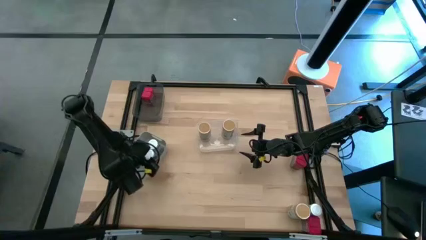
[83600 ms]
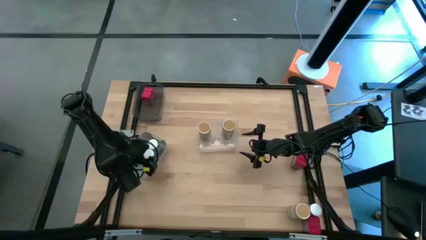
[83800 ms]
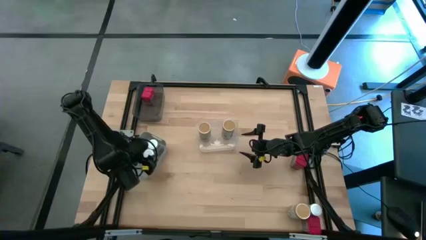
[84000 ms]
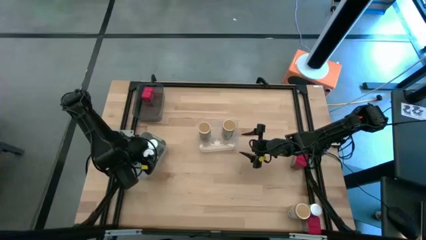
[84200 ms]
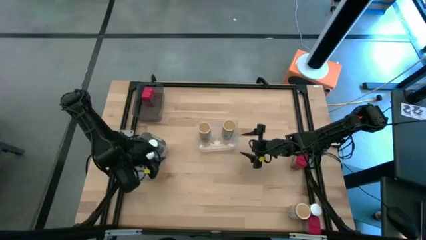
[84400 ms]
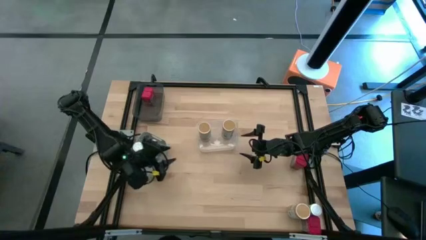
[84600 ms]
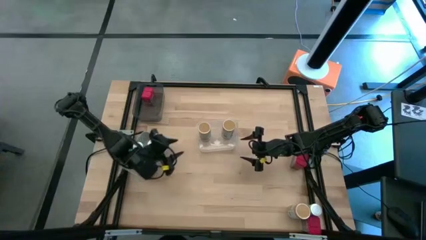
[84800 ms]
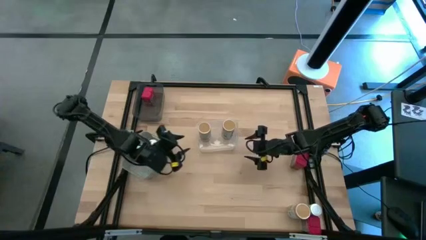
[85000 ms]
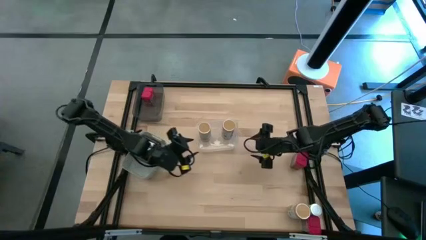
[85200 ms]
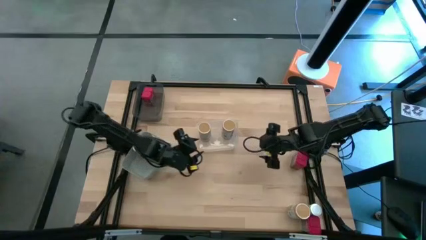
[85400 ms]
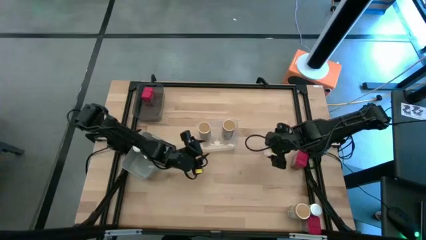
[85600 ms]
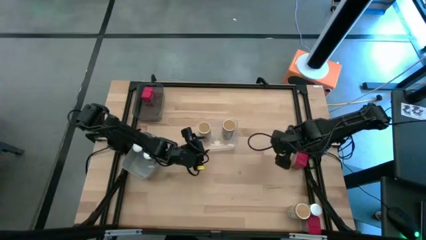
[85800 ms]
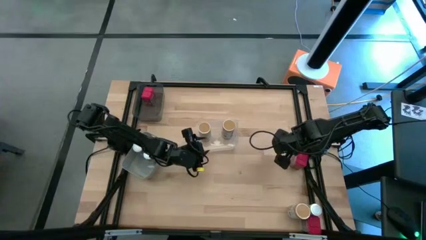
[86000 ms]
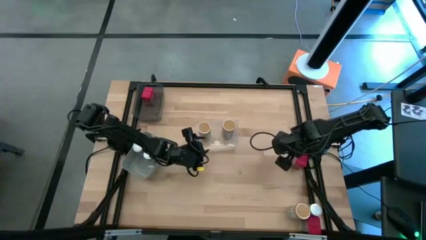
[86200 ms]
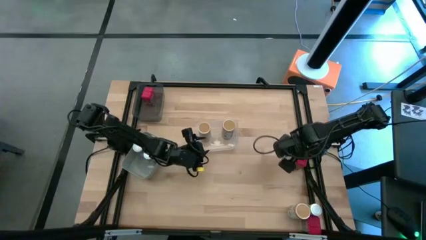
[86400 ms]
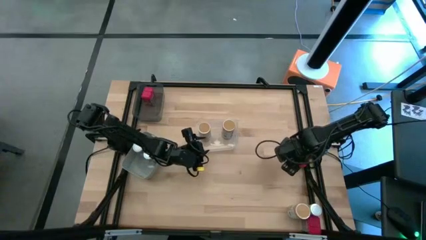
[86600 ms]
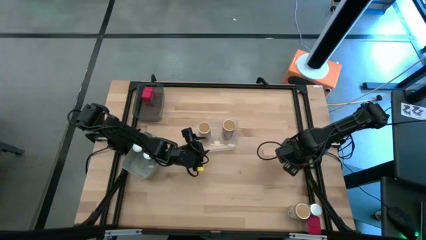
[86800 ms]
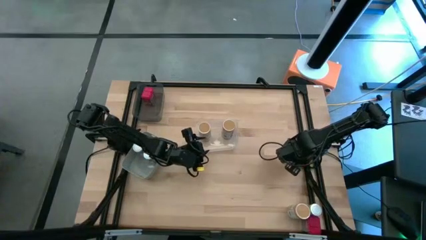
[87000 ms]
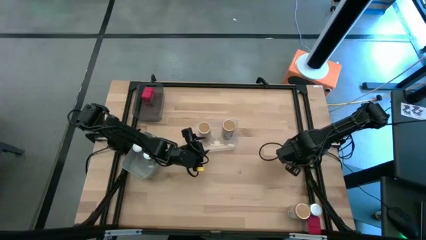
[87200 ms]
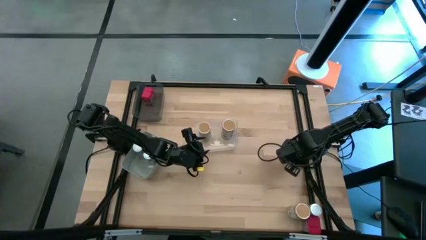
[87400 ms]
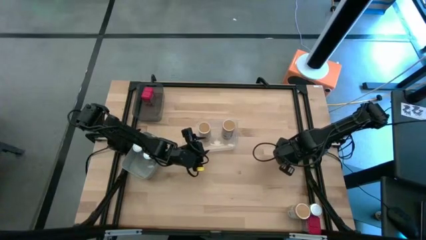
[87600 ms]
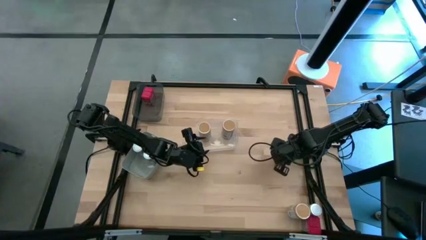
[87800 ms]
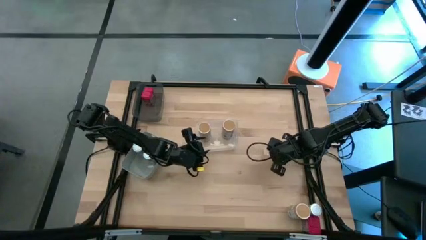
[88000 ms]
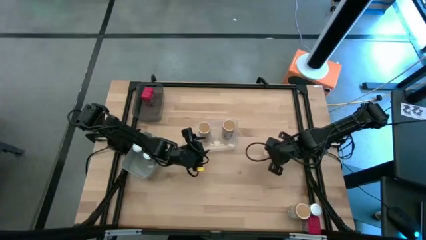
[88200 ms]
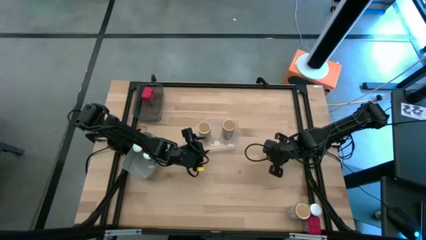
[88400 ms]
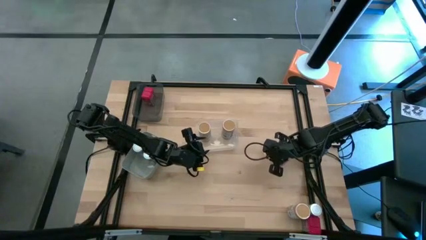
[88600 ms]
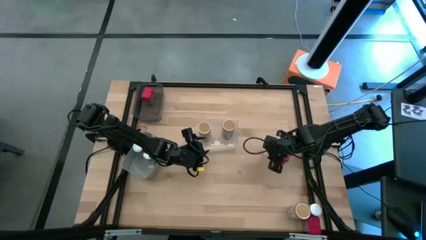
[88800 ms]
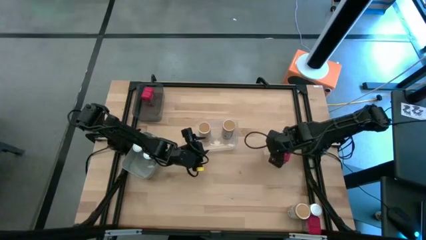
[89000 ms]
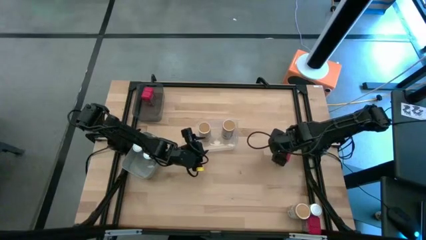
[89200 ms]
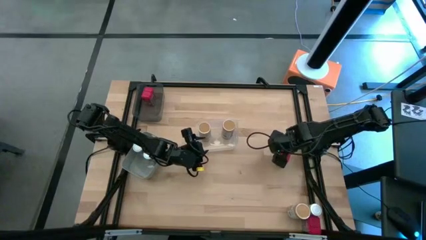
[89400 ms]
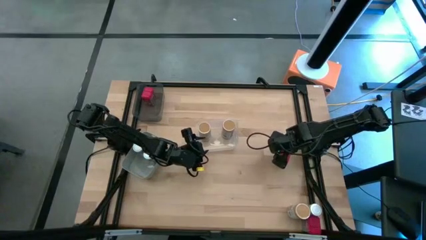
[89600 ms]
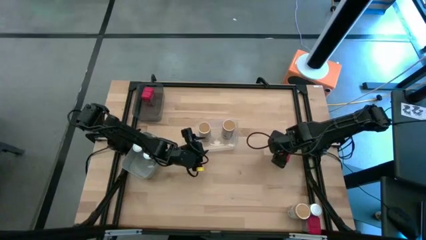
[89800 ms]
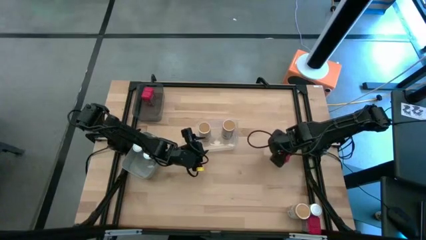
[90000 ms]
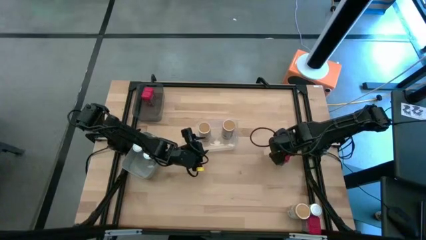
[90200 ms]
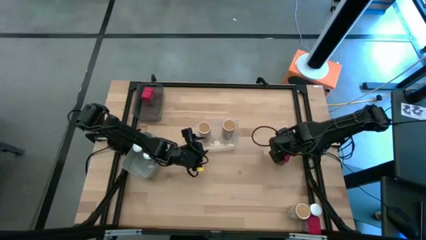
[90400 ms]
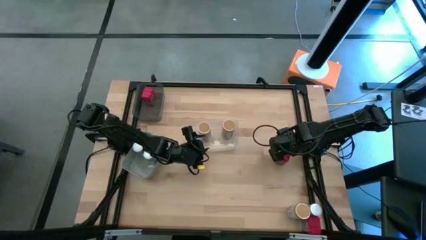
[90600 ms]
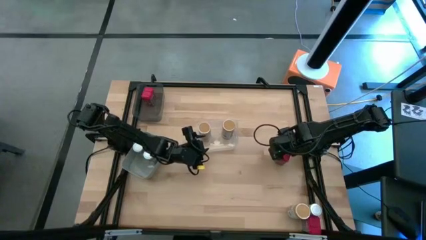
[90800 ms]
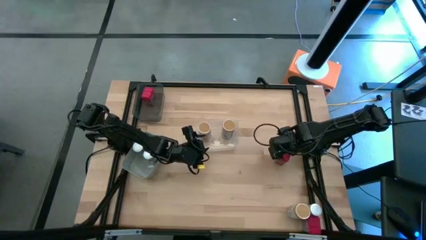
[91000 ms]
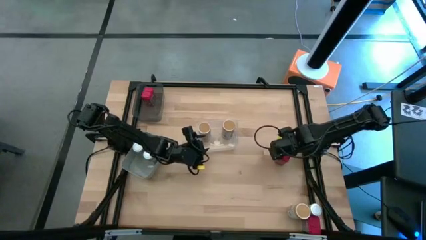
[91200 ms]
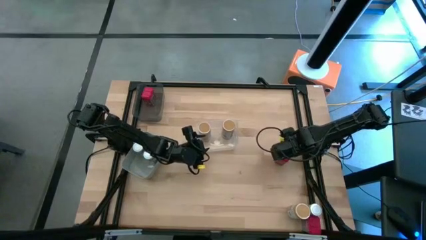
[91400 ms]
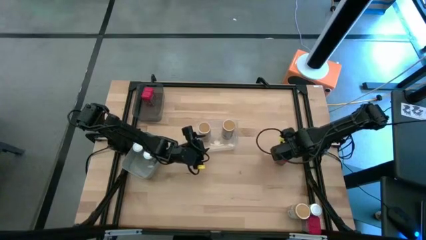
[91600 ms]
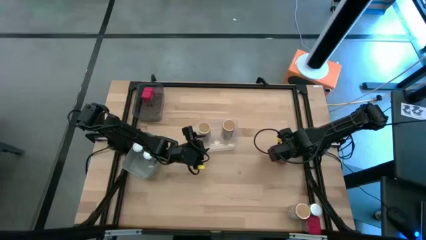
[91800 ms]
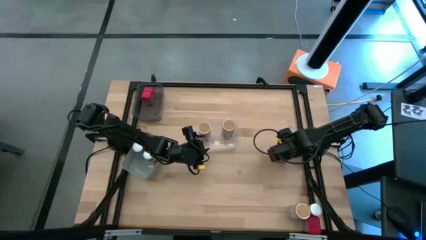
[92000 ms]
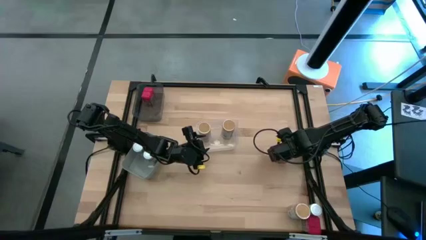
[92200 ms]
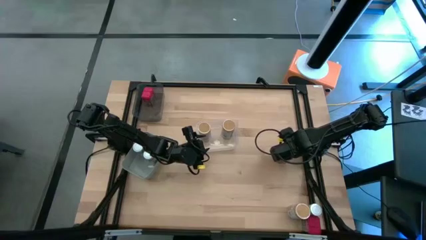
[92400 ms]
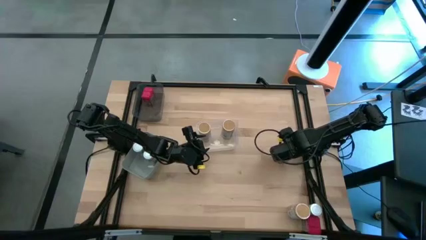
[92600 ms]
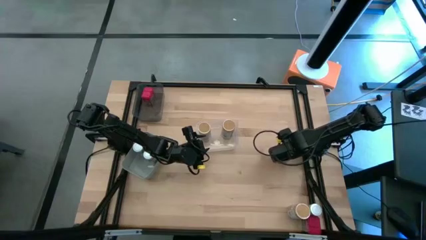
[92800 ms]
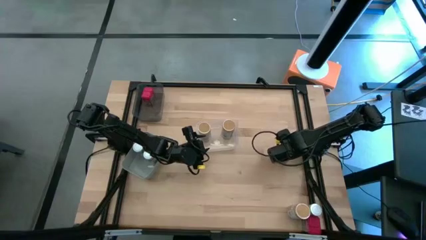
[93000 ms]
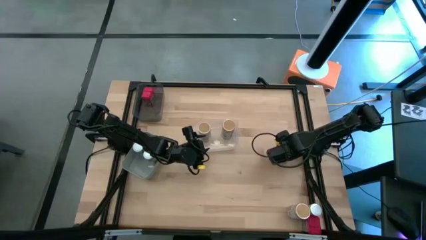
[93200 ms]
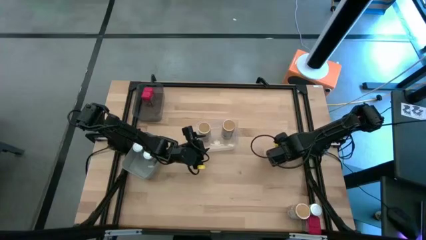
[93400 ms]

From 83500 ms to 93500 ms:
Task: Sort spices by type
Put the top red seasoning can into the black bin

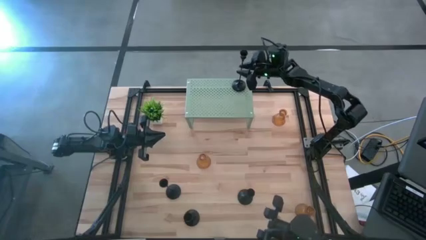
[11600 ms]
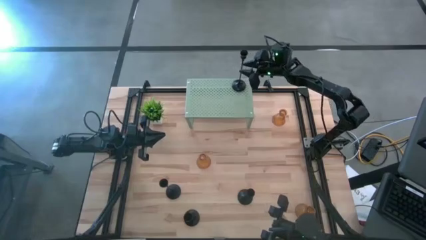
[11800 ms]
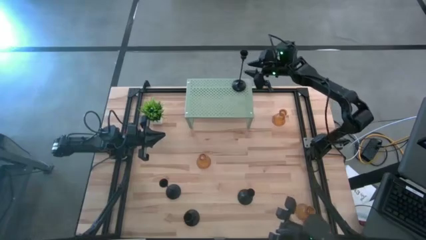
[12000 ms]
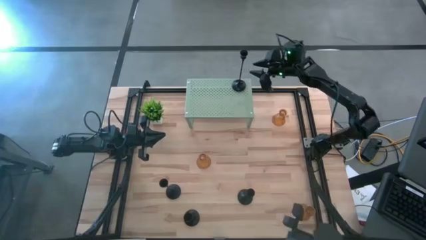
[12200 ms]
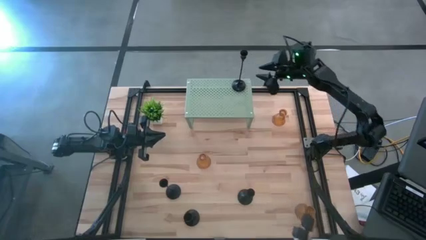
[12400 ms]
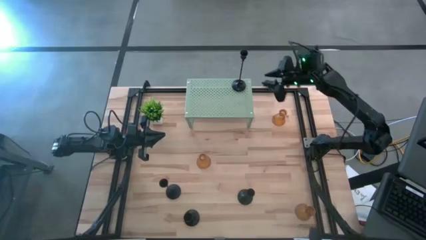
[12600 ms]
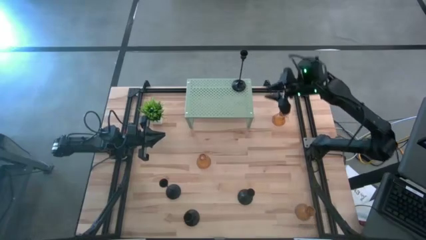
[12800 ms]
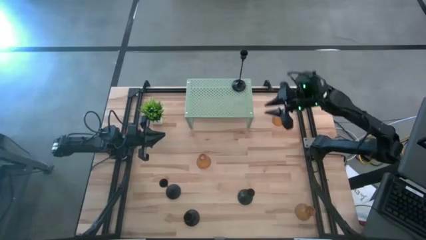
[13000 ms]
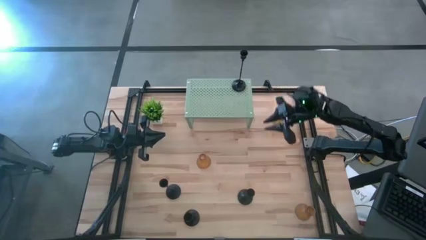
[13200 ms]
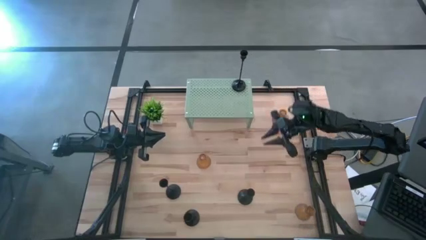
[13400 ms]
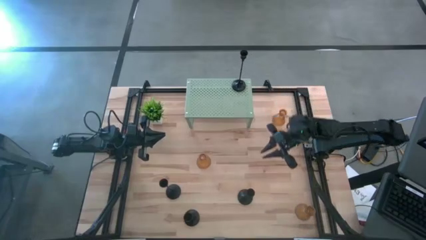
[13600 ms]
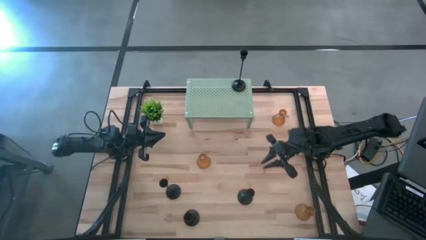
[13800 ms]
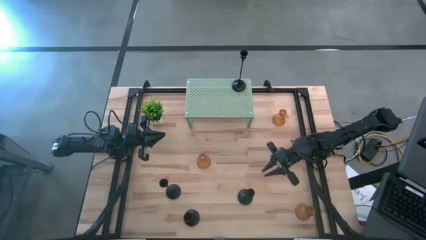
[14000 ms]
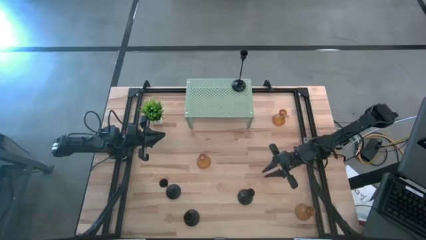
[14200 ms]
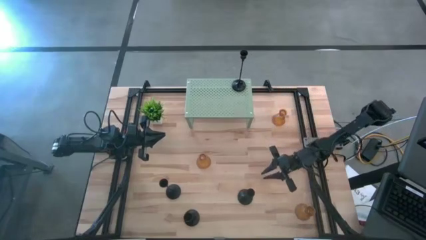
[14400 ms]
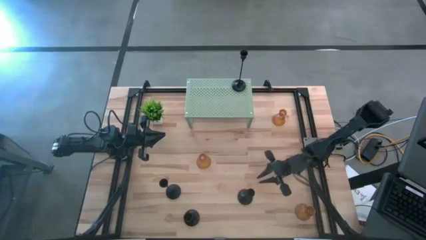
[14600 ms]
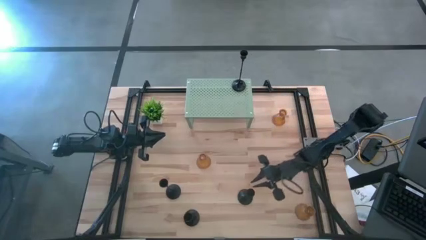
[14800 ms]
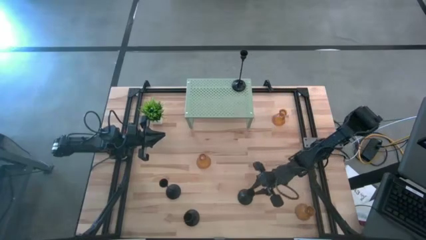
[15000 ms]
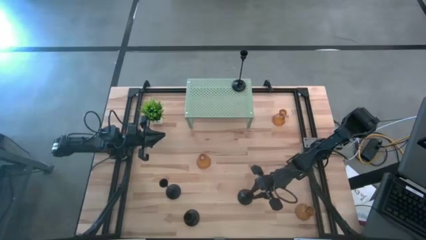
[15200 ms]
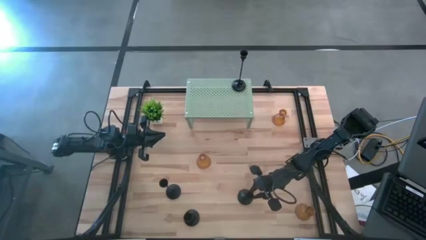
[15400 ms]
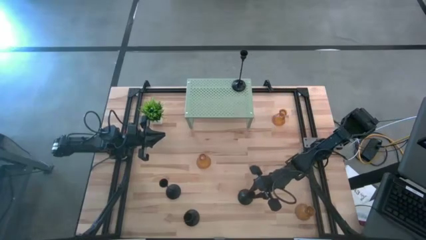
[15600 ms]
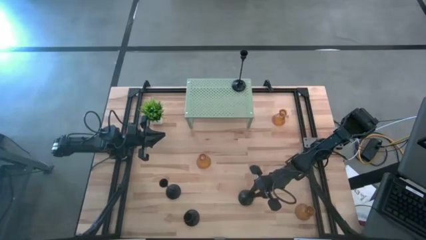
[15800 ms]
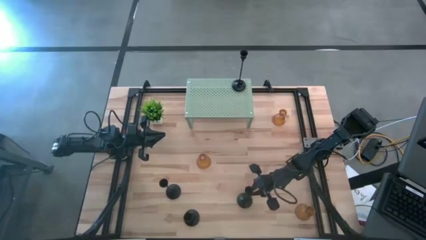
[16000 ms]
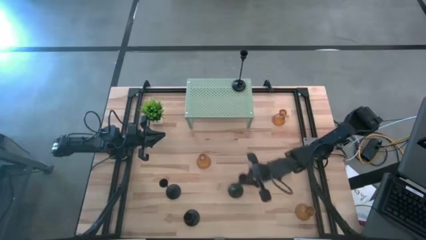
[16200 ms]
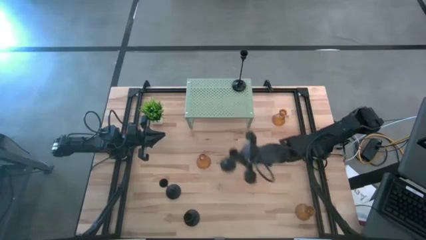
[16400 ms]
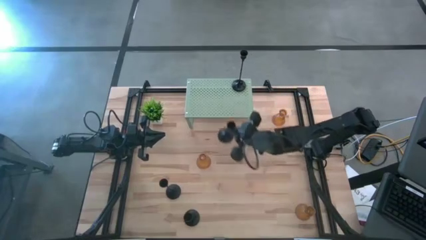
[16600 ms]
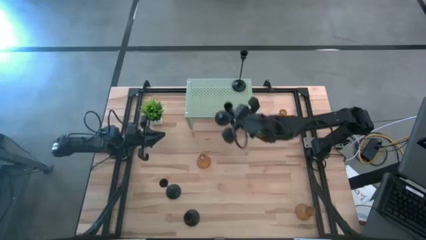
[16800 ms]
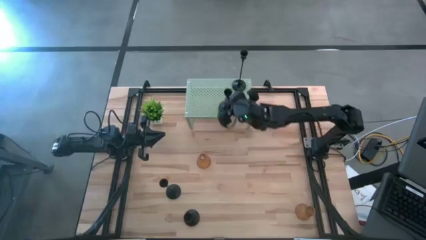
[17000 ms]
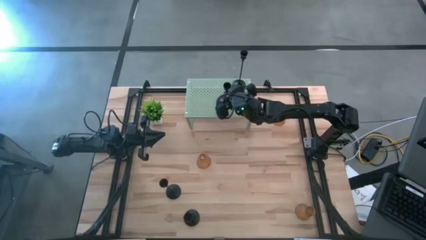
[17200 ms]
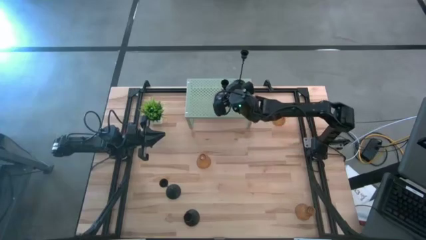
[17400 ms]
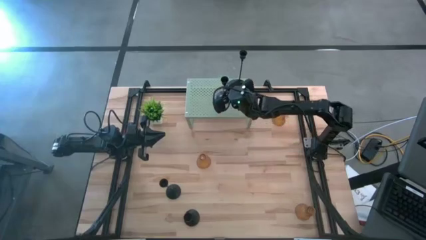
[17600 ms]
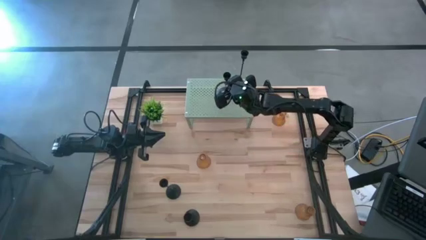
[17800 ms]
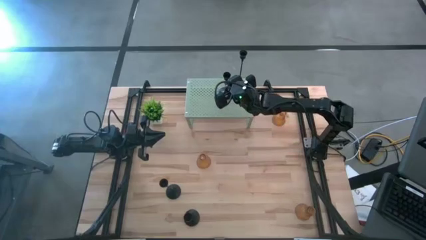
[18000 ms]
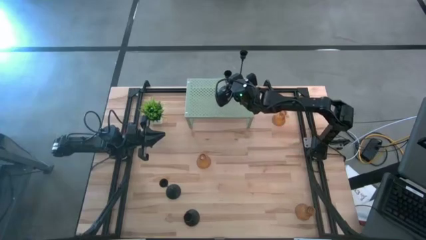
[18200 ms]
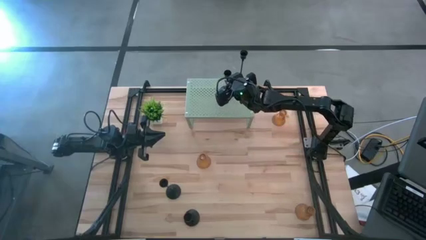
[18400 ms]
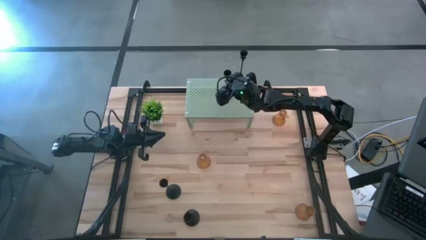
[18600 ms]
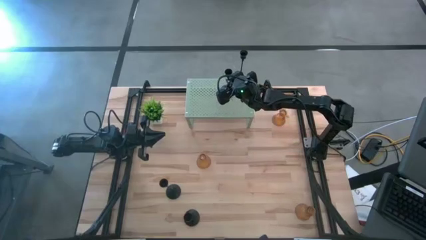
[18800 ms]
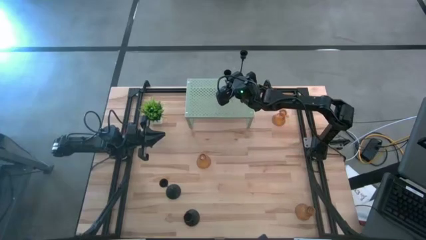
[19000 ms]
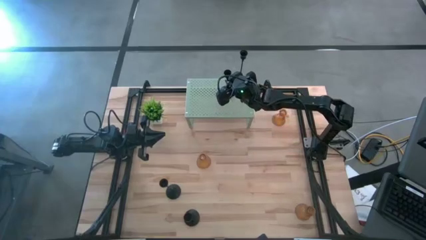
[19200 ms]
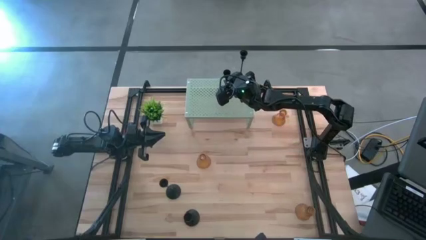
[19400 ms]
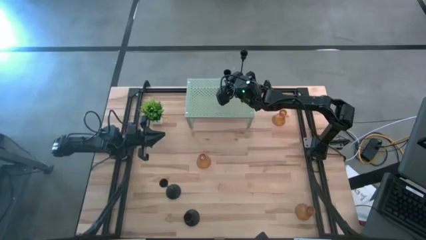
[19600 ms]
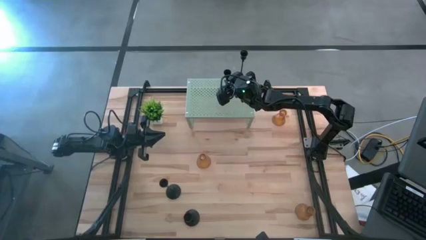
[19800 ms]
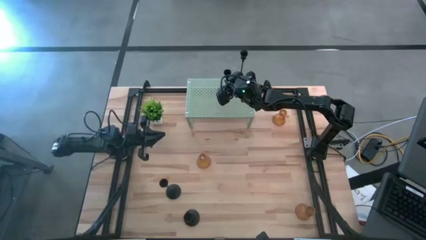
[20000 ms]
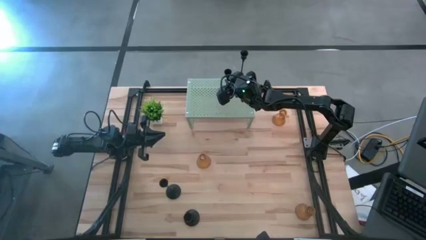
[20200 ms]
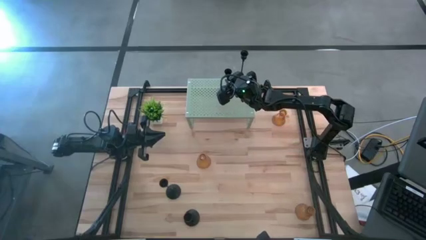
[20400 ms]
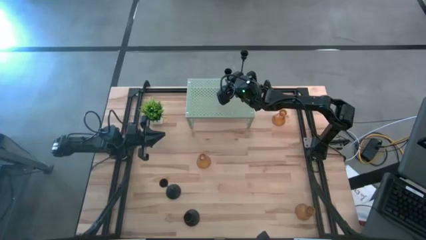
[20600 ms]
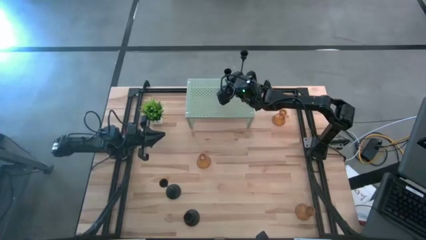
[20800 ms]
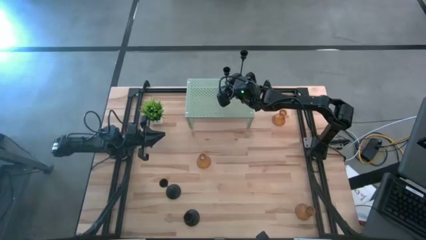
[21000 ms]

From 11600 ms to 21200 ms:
Task: Pick & Place candle stick holders
Put the black candle holder on the shelf aligned with the other black candle holder
